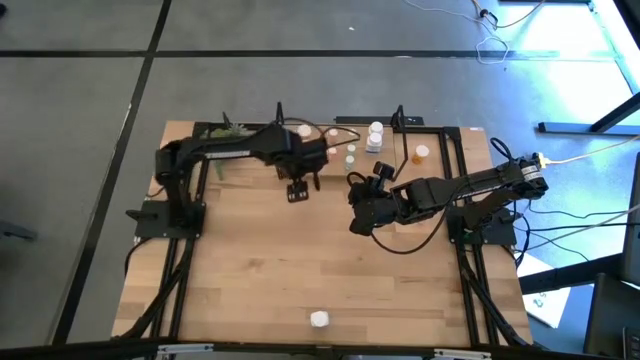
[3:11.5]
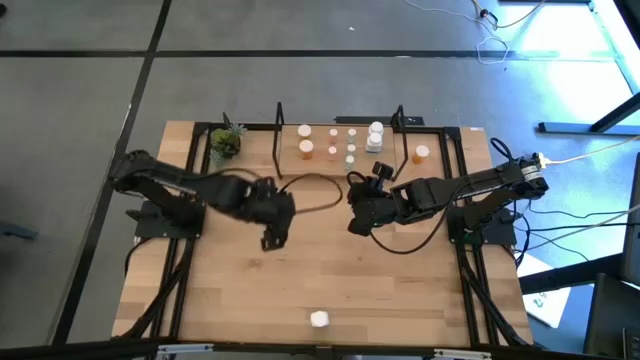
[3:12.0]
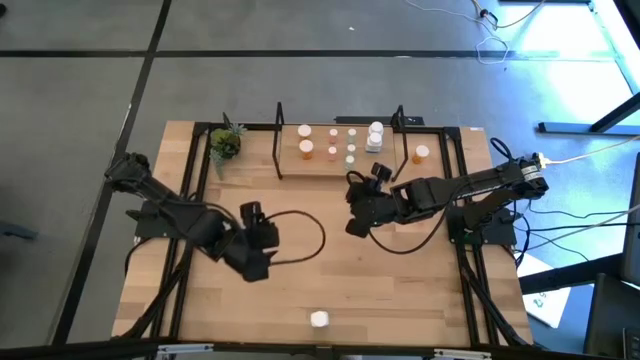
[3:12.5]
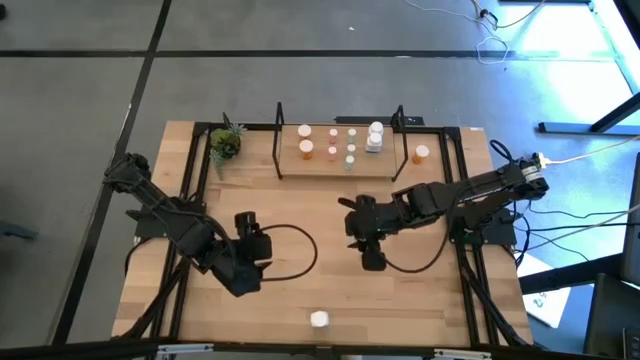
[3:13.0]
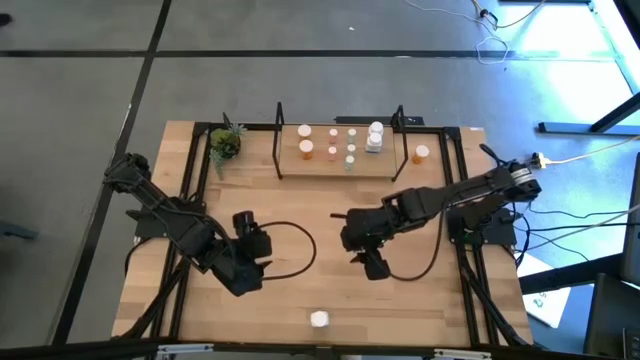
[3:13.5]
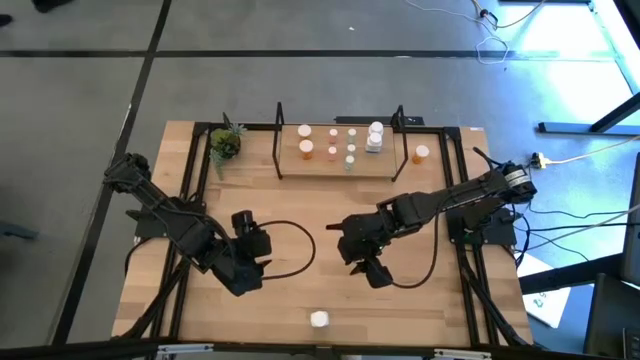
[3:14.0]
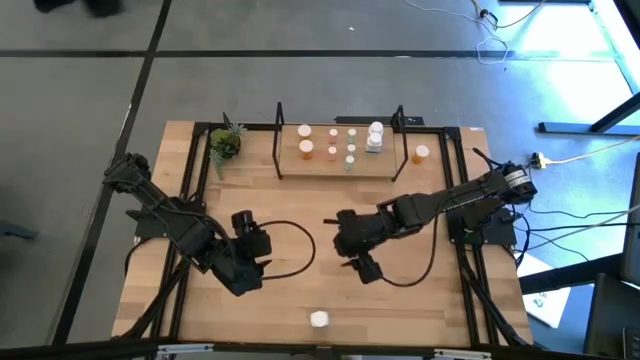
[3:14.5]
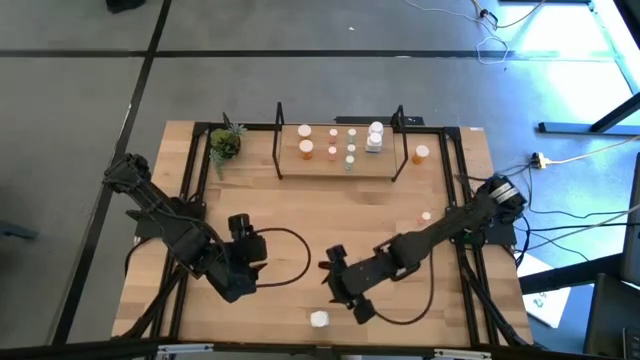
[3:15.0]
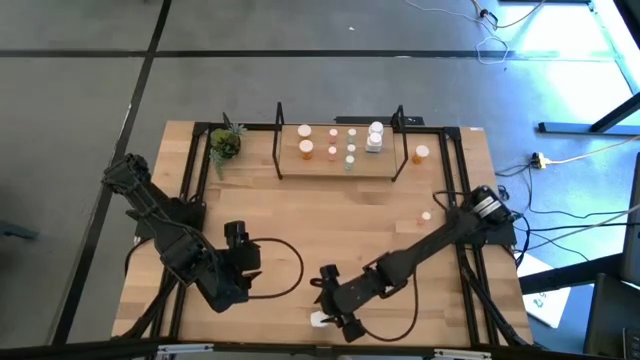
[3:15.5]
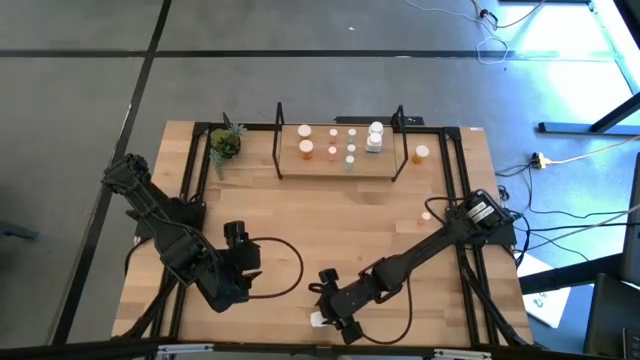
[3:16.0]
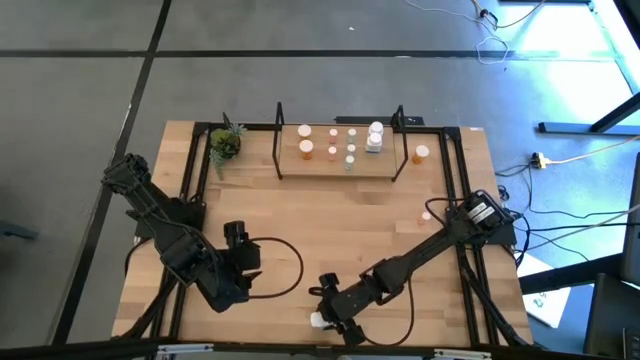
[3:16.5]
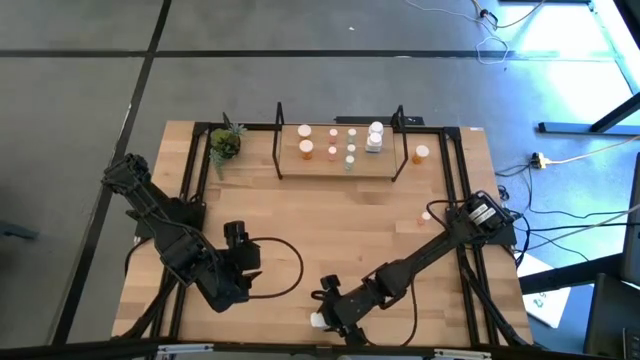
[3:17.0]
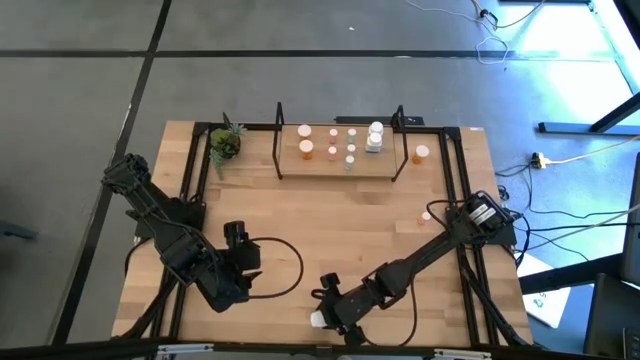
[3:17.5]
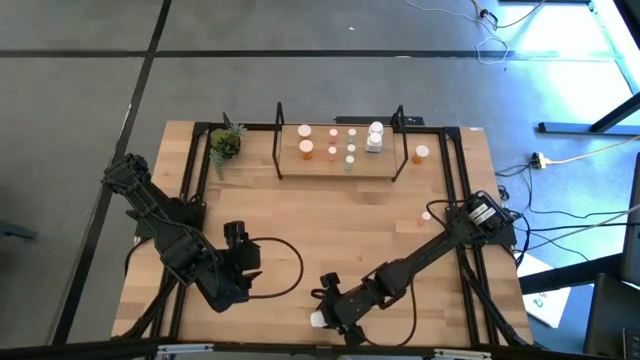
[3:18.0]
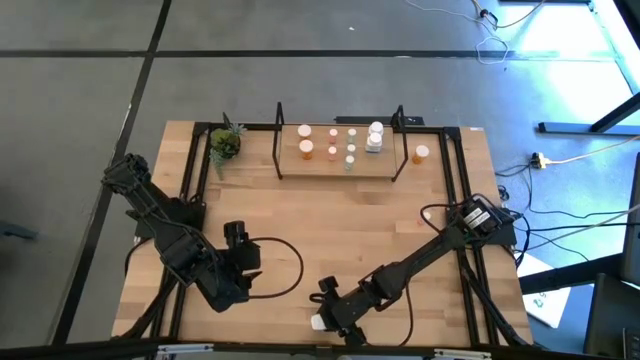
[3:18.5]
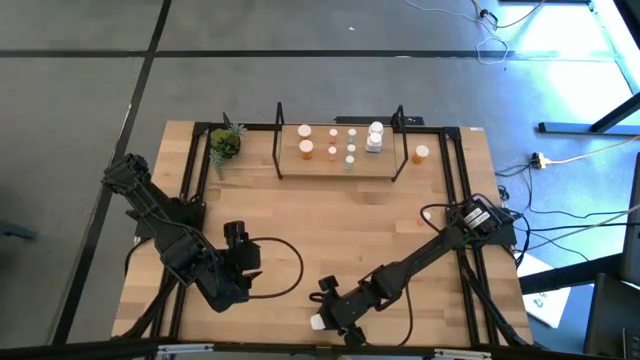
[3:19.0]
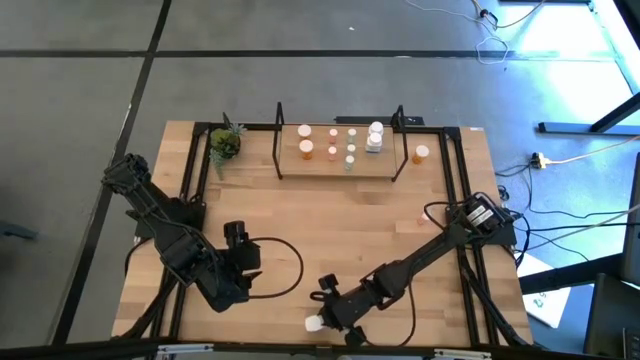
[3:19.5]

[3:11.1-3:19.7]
Task: Pick and place medicine bottles onto shelf by color
Put the white pill bottle on the shelf aligned with the white bottles

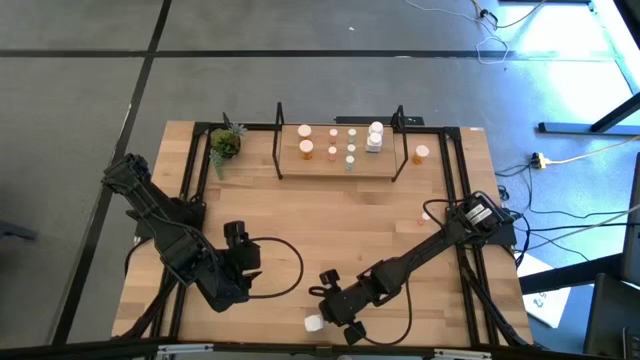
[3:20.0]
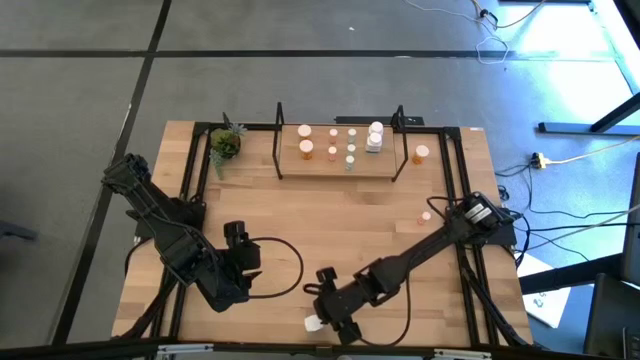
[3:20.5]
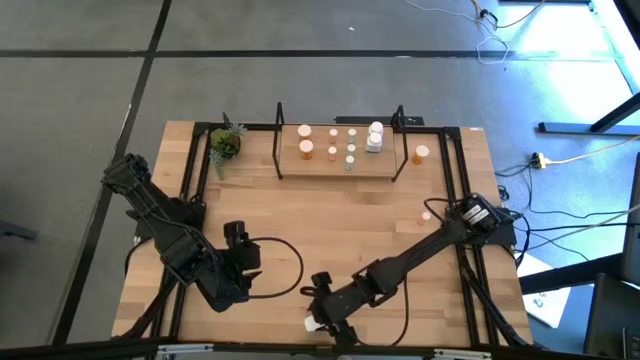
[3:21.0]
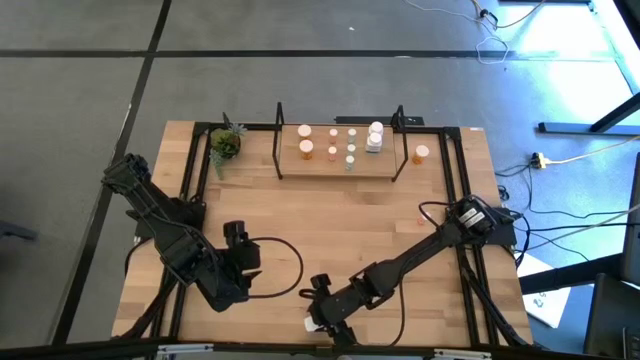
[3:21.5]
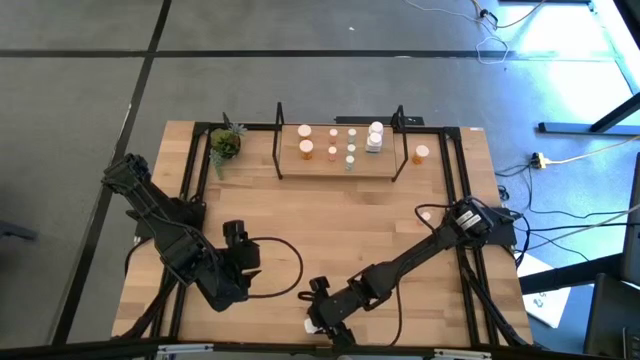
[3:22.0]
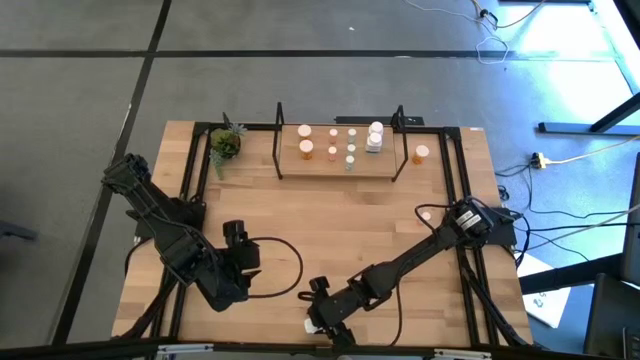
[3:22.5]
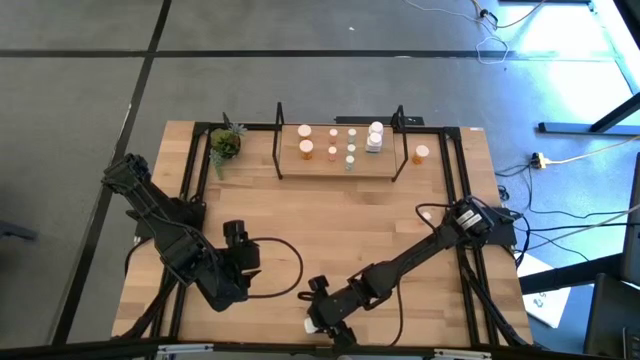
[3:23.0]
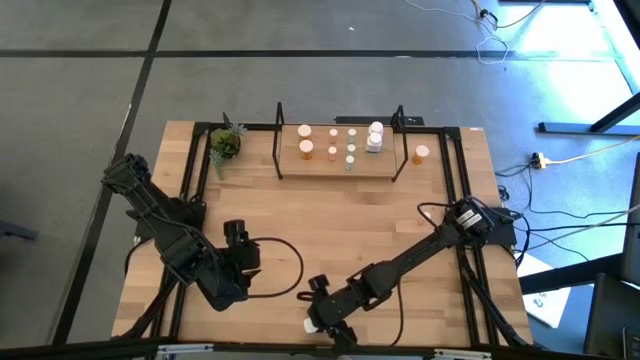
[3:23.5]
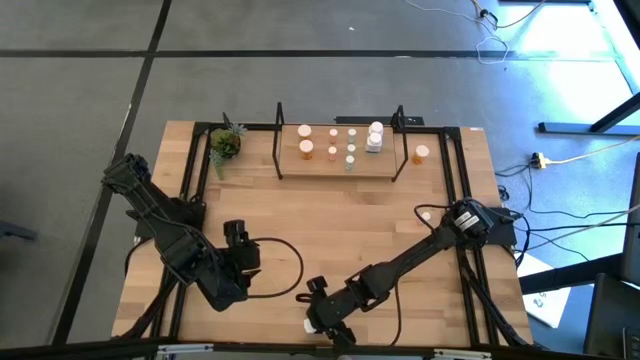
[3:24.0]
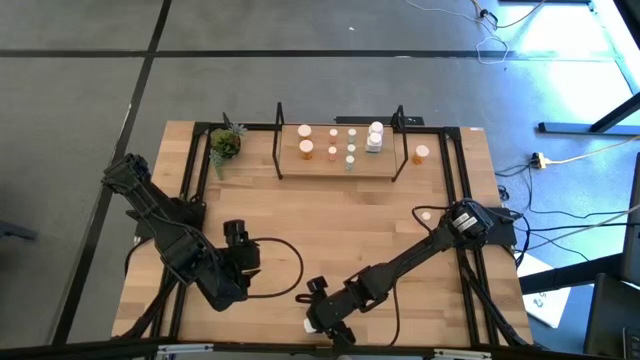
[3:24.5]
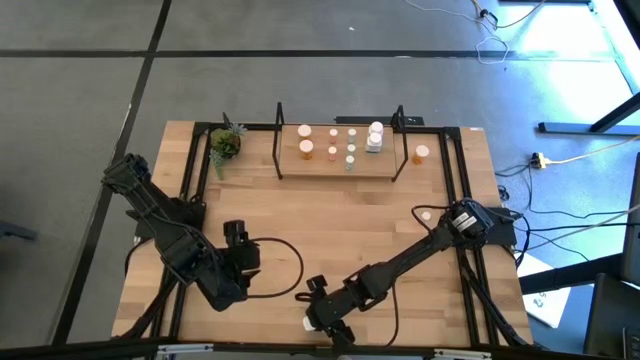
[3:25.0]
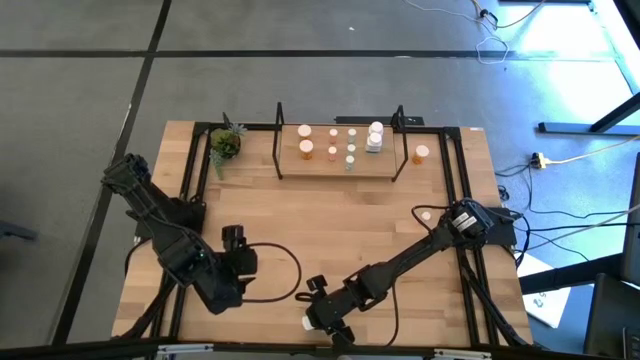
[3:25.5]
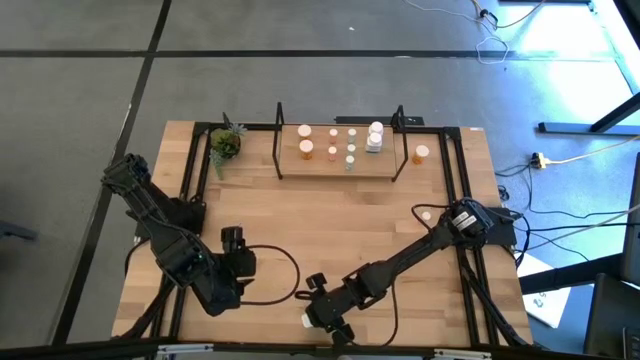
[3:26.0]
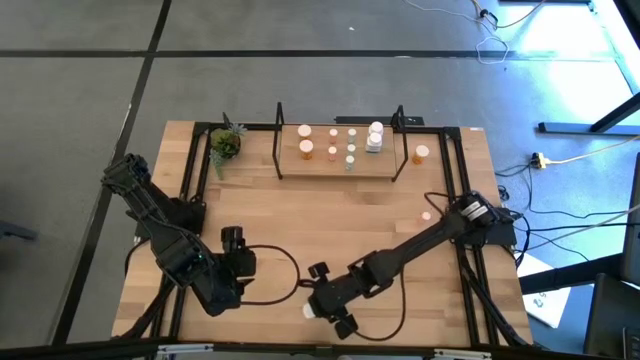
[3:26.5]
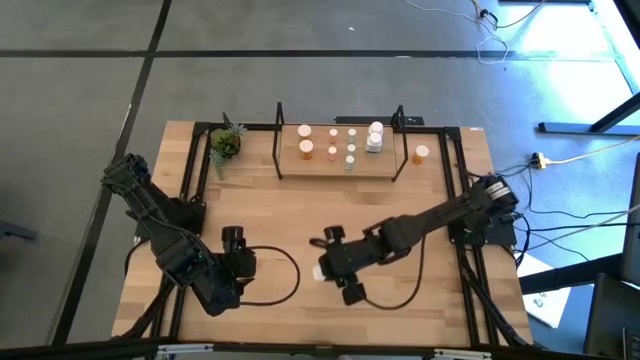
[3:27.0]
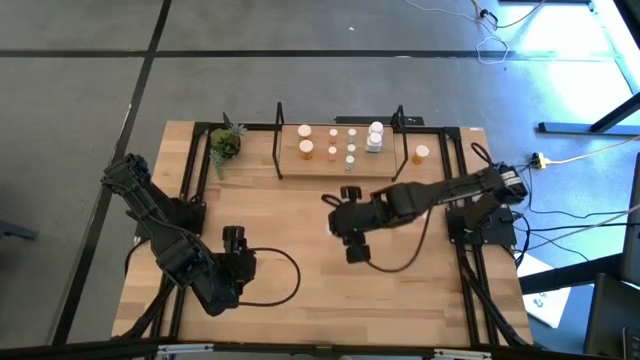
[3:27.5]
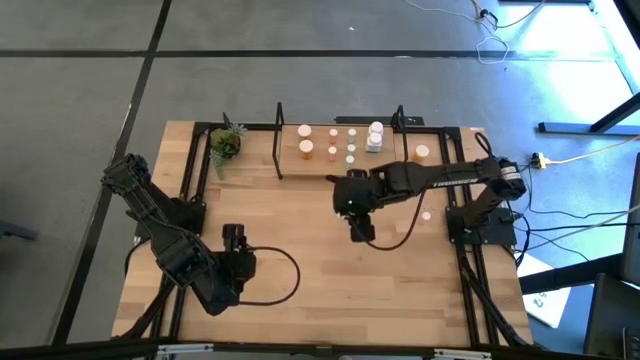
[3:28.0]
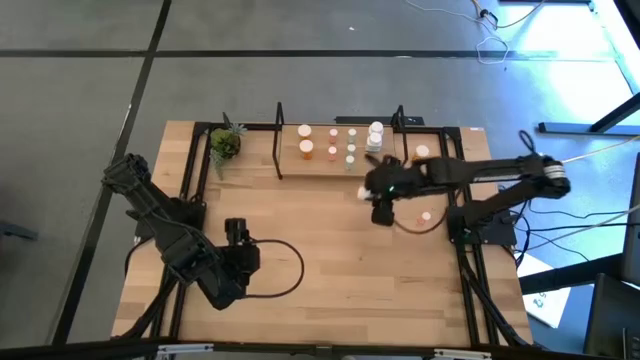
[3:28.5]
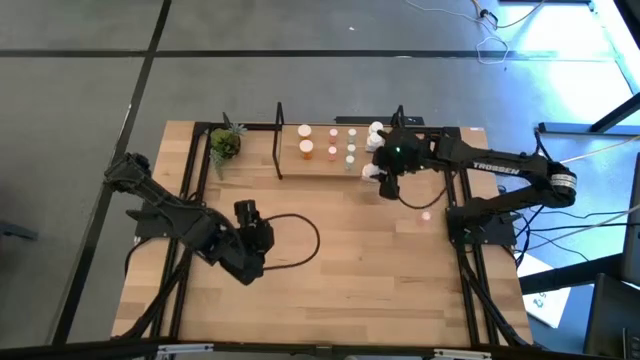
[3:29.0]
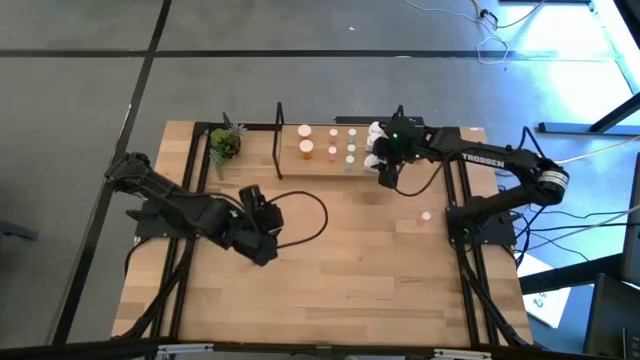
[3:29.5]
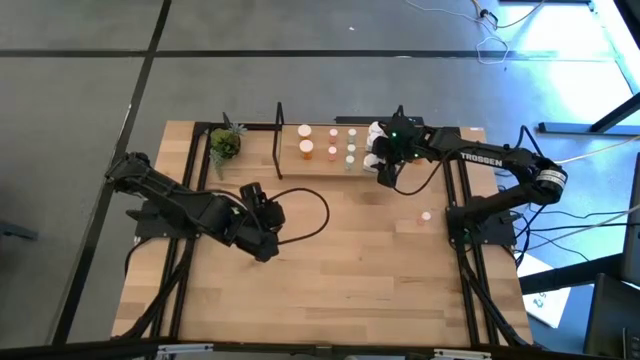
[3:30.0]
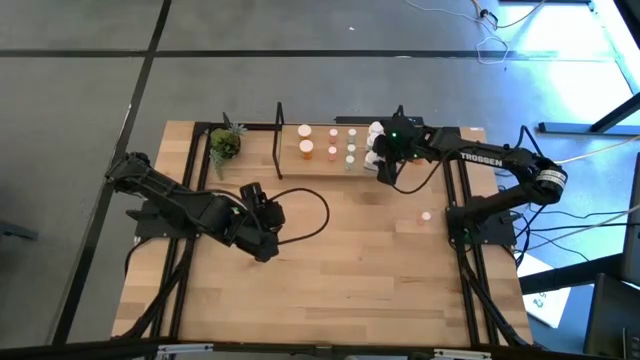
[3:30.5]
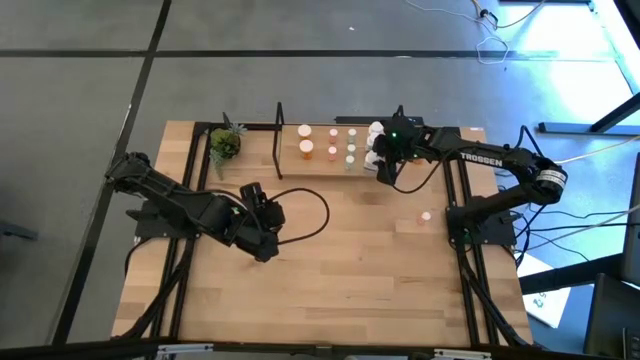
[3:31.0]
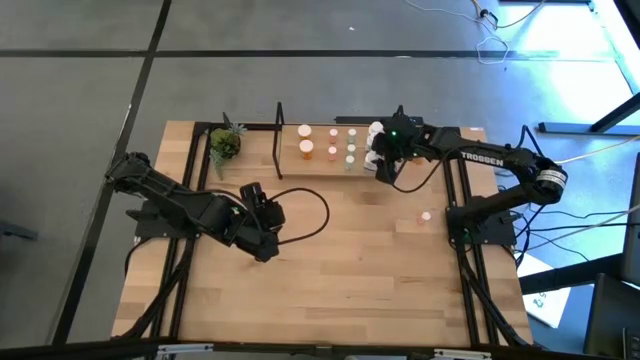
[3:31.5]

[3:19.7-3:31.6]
Put the white pill bottle on the shelf aligned with the white bottles

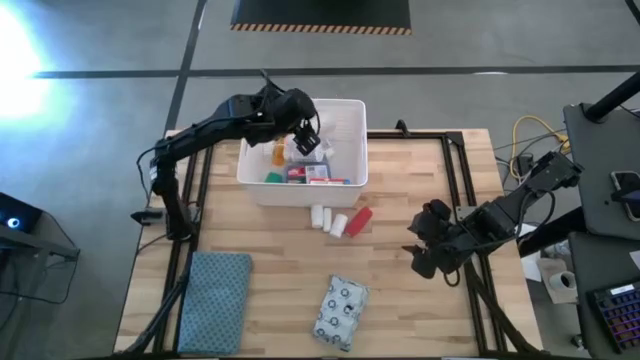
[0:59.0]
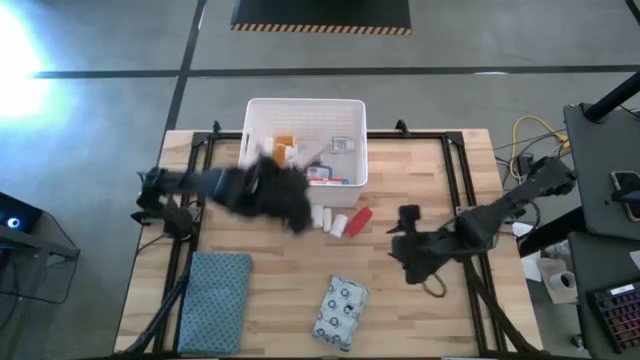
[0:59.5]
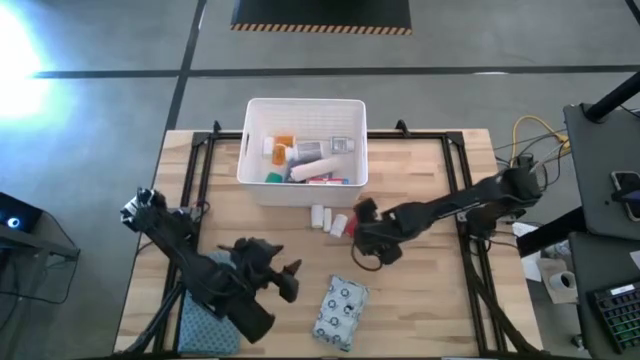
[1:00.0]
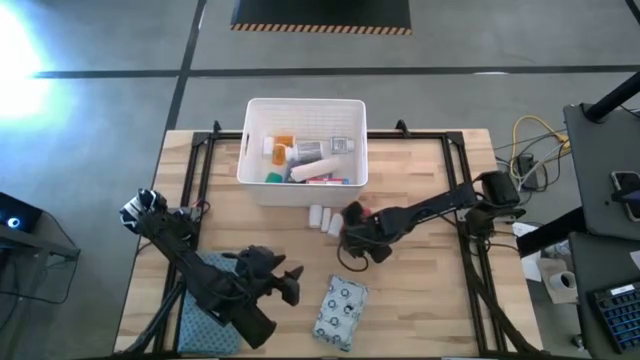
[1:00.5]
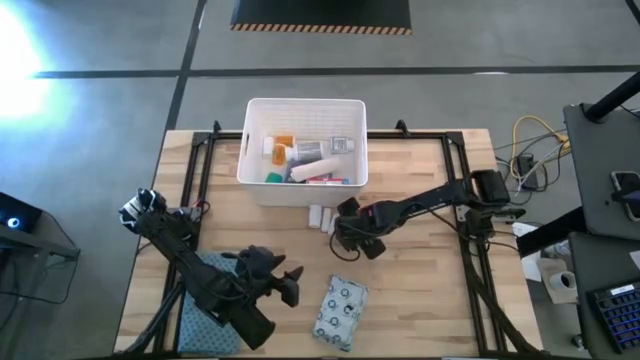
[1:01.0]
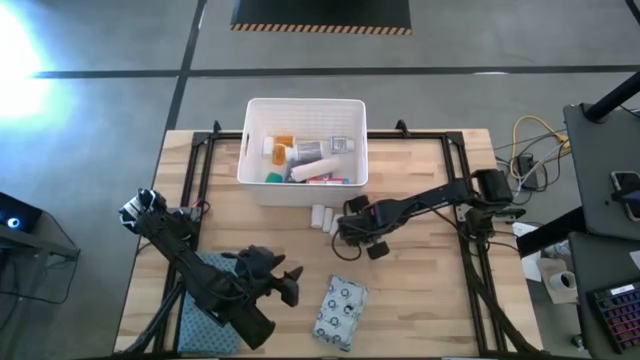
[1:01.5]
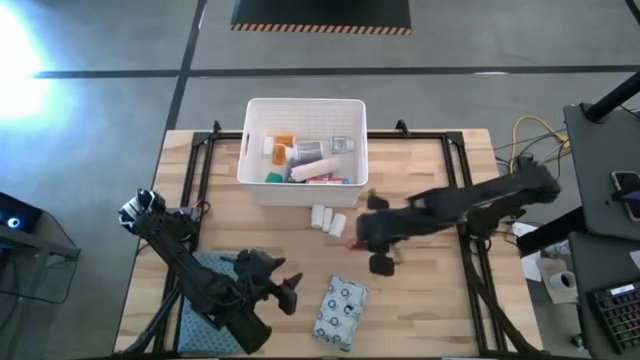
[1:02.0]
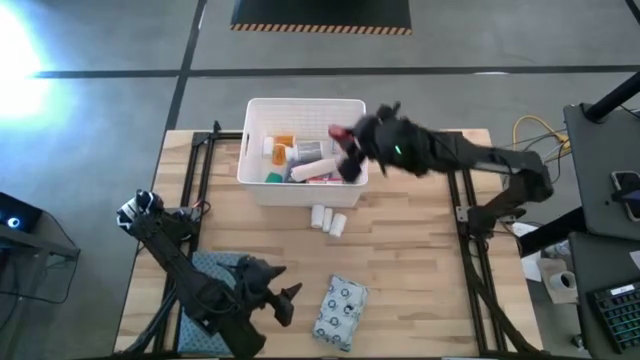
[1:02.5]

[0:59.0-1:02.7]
Task: Pick & place medical supplies in basket/bin
Put the red bandage into the white bin
